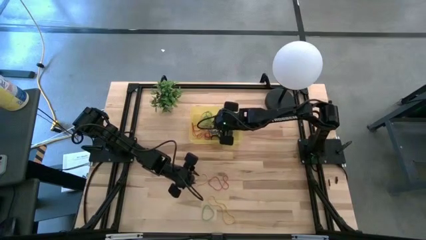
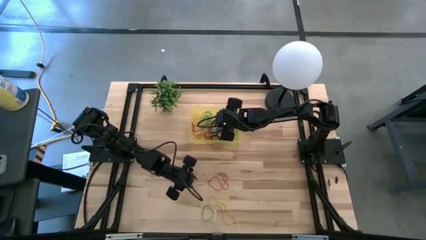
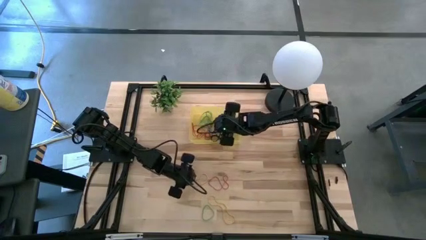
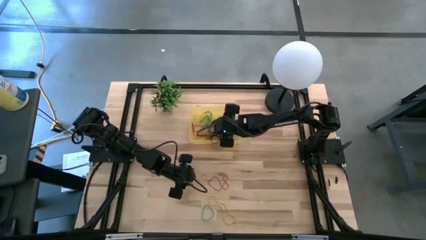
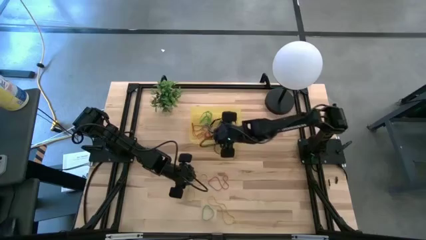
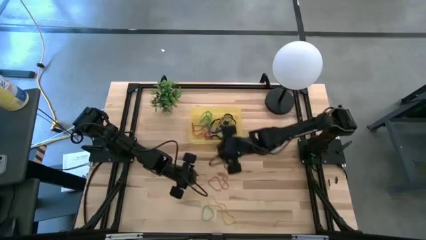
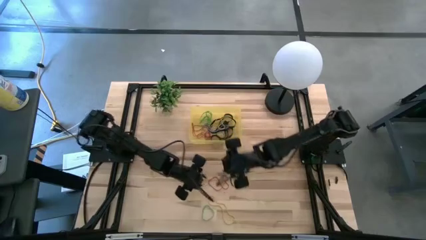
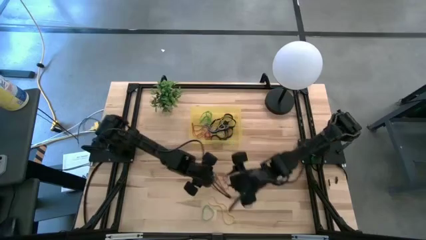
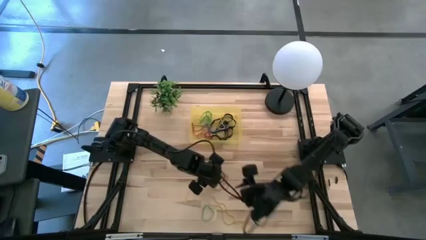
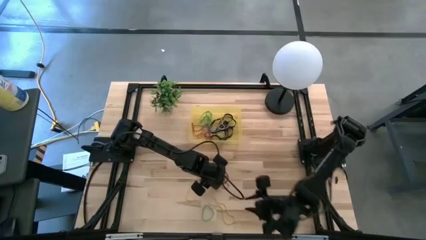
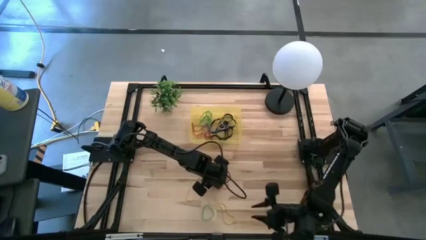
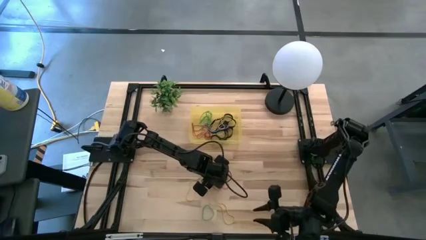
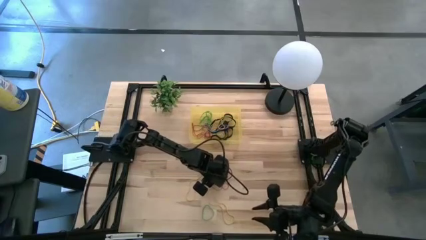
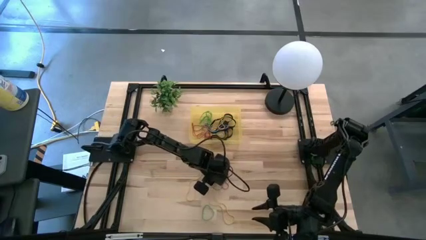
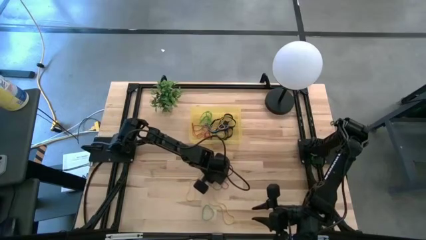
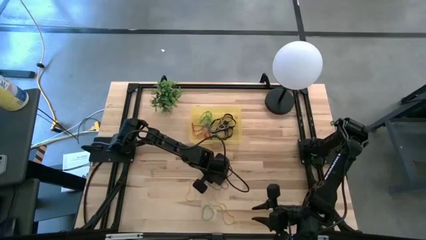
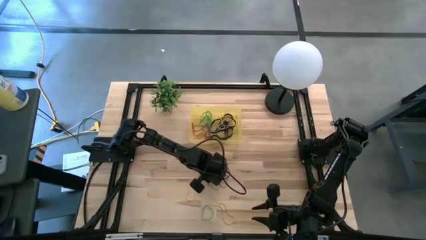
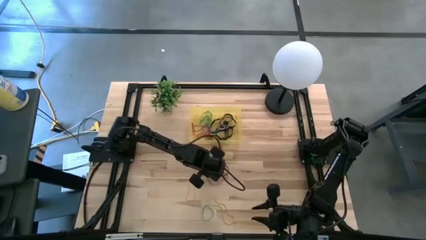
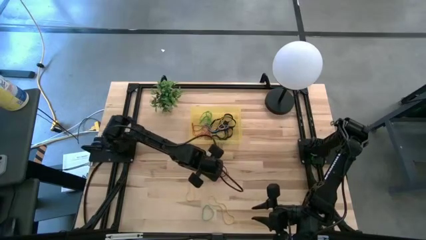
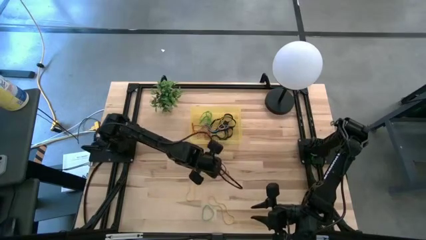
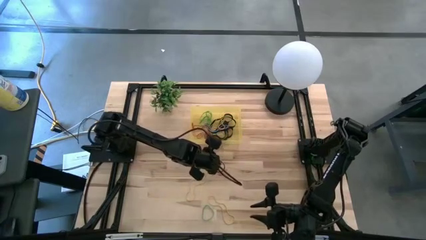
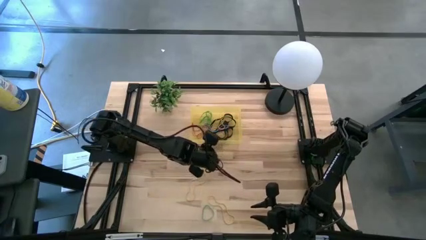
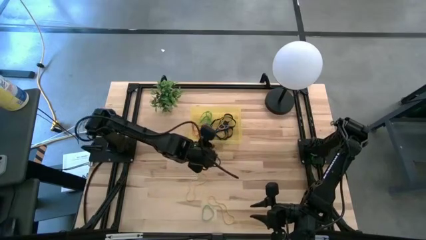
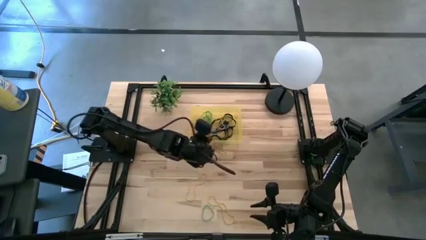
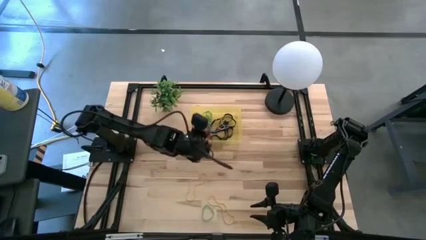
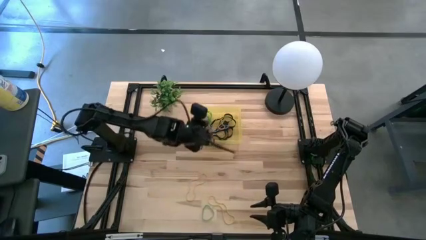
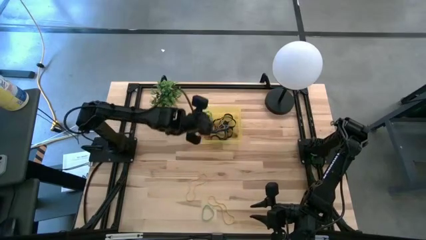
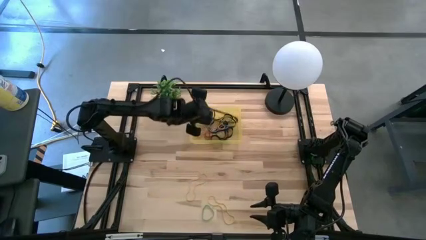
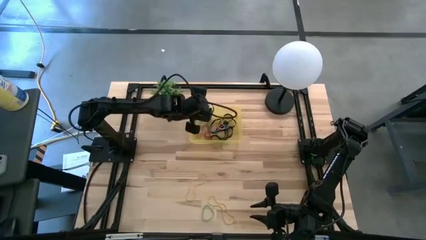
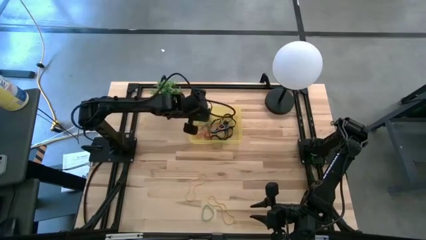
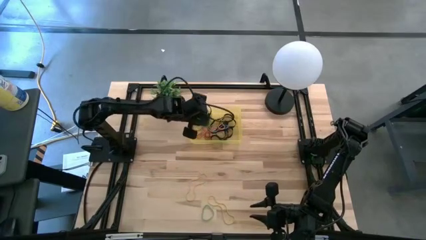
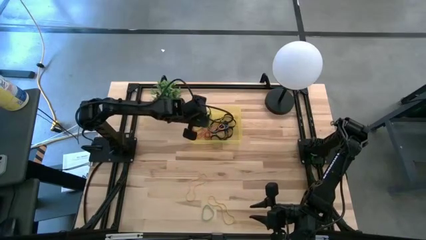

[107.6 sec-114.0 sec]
Task: Pick and place rubber bands into bin
Put the red rubber band into the yellow bin

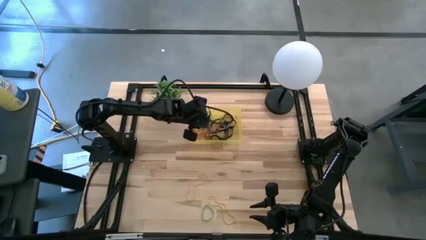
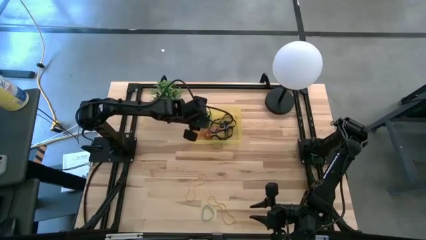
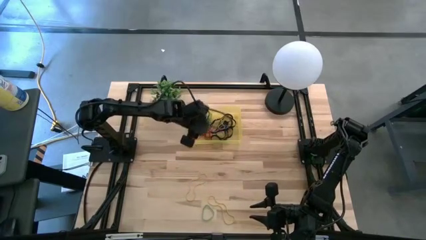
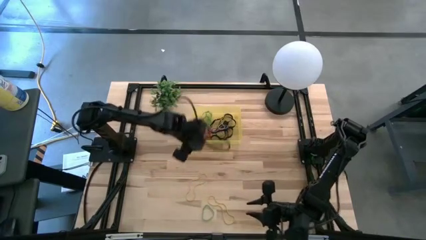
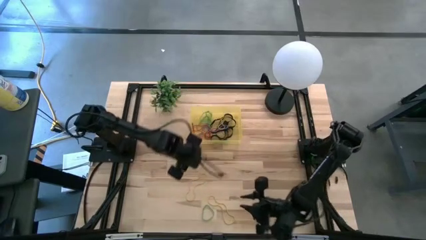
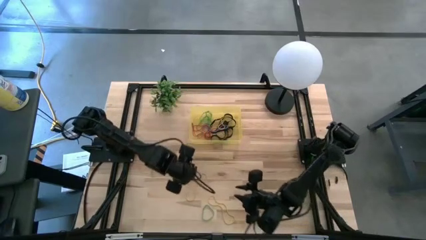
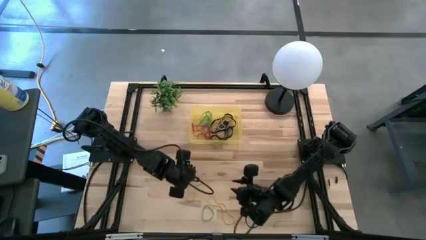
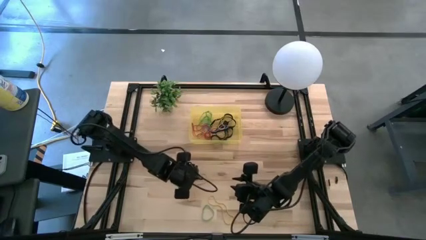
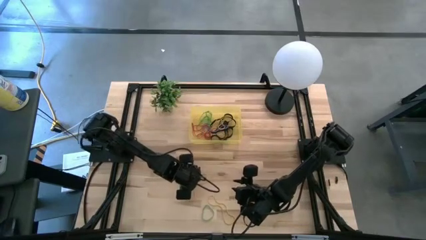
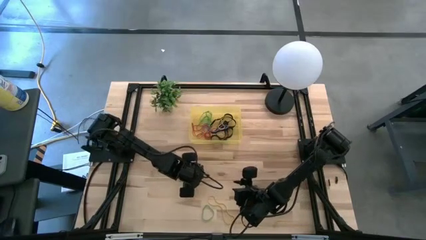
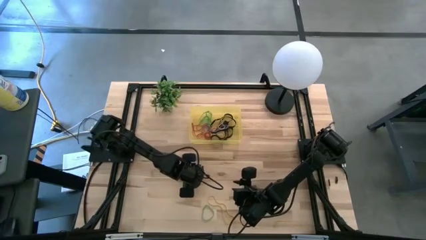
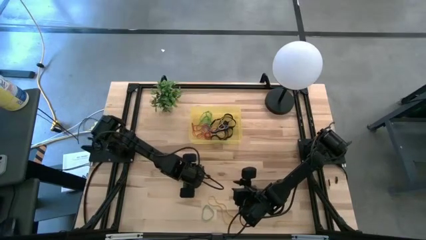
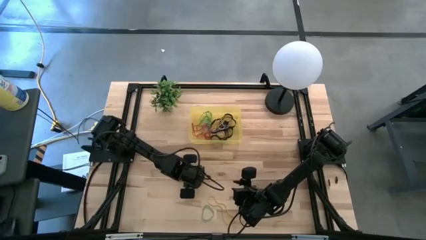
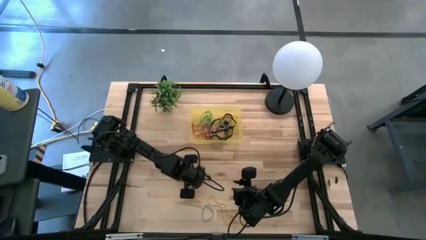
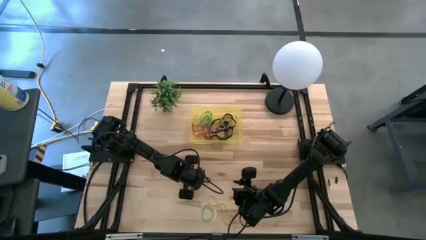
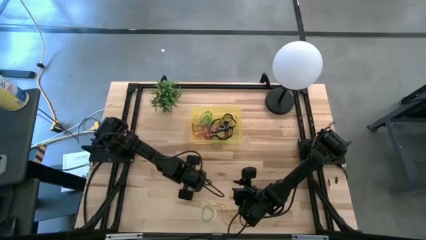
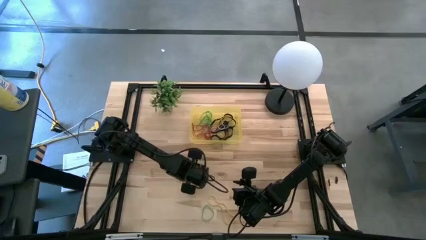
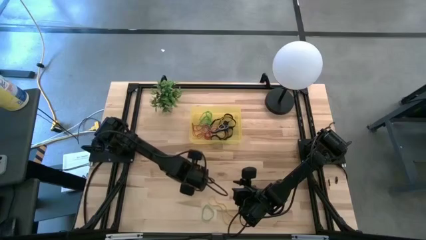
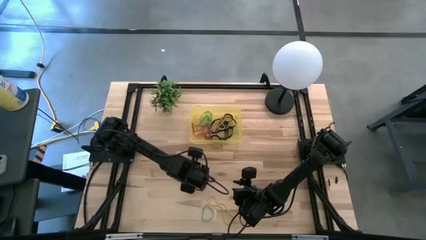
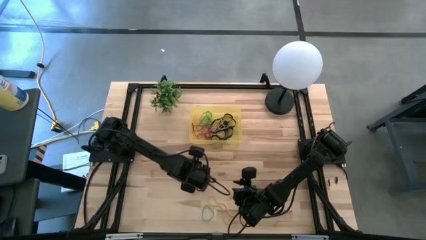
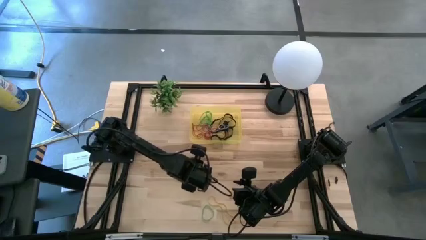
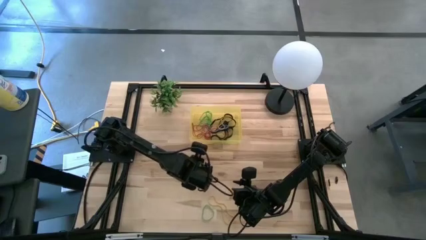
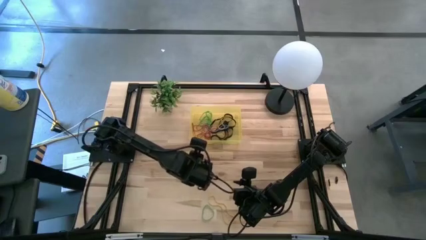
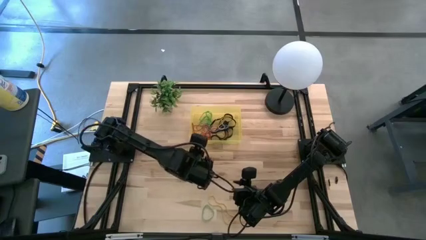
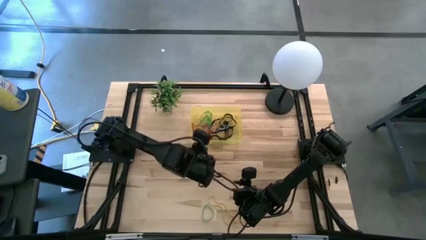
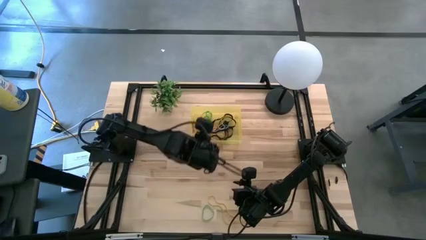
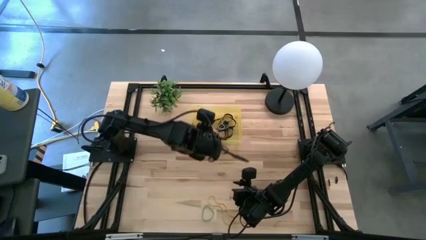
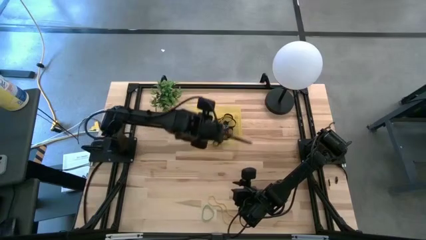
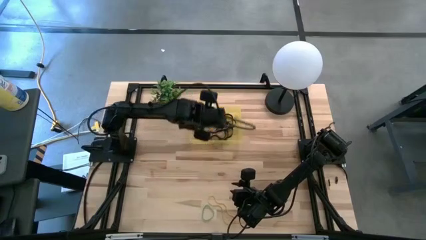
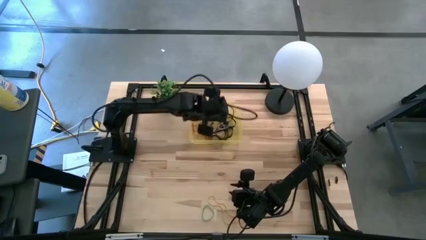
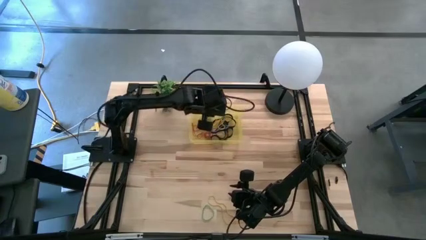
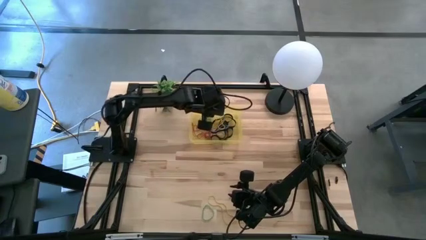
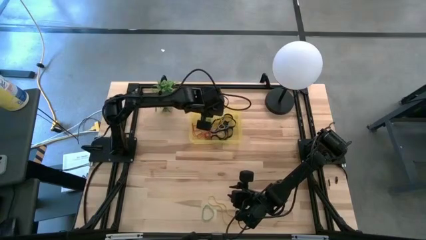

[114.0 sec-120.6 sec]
Put the yellow rubber band into the yellow bin

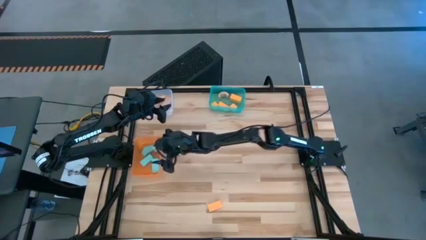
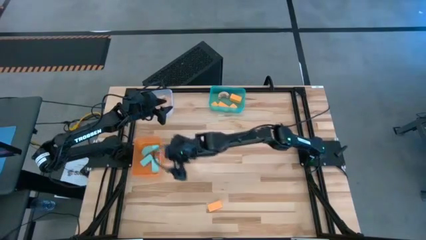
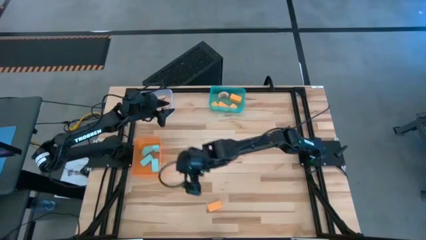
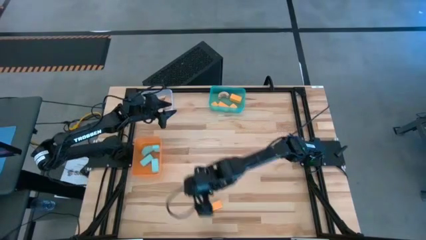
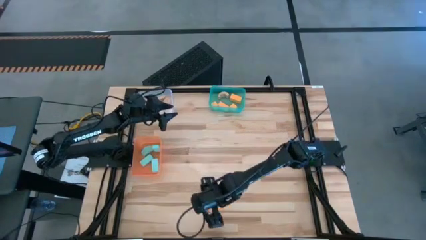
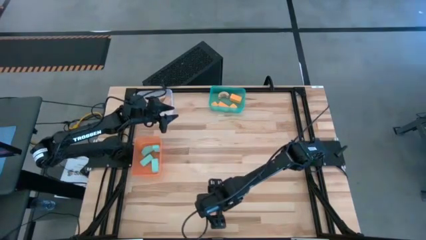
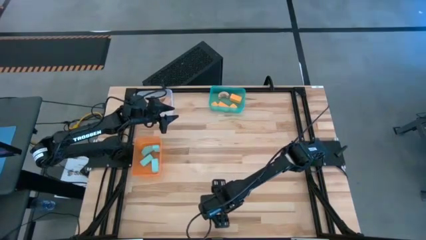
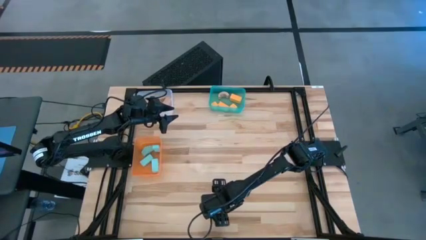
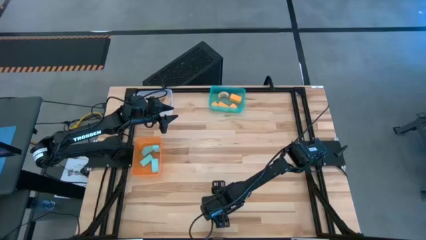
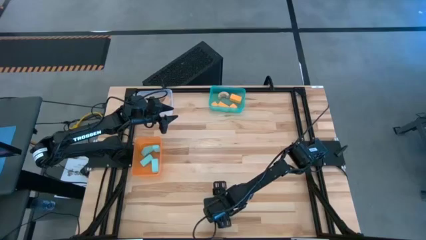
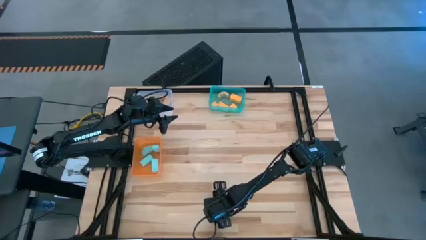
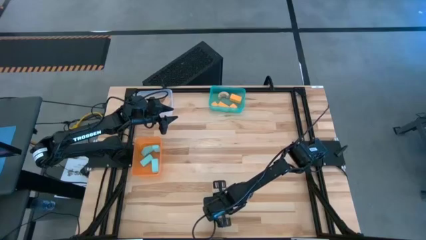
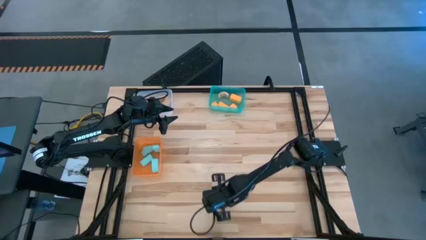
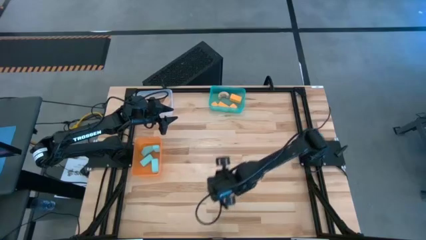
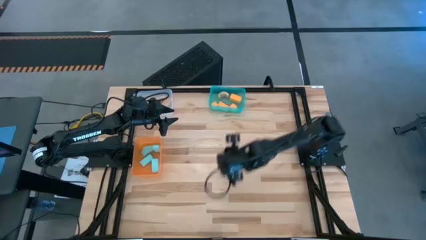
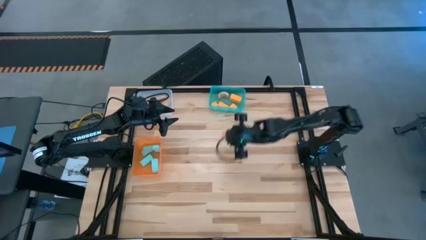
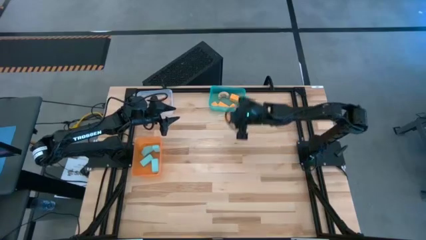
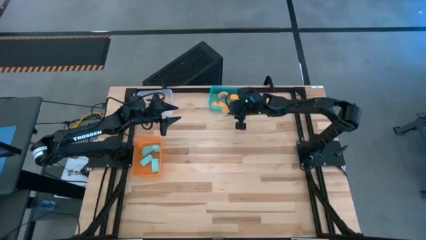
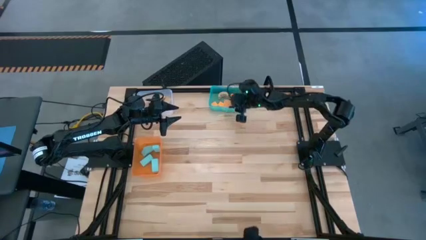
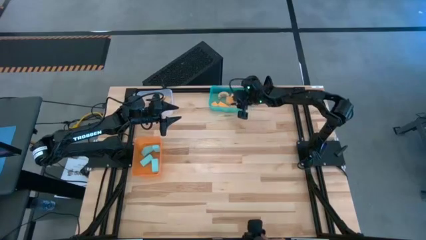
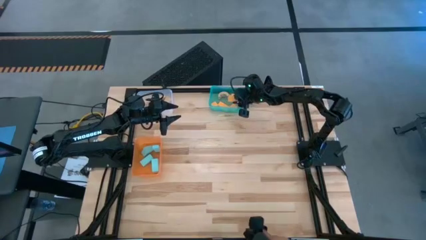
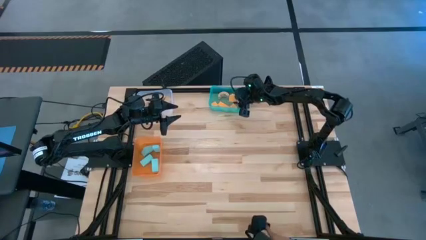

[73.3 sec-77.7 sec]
Task: Sort & place blocks by color
Put the yellow block into the green bin
